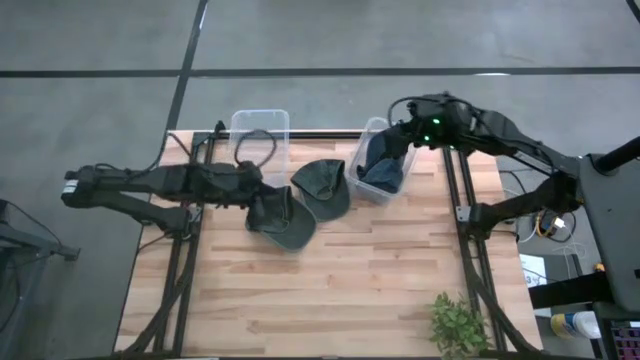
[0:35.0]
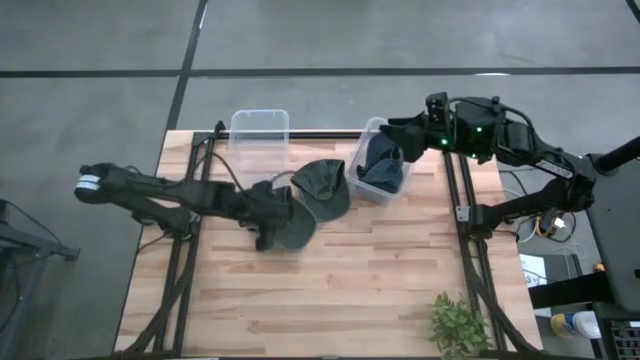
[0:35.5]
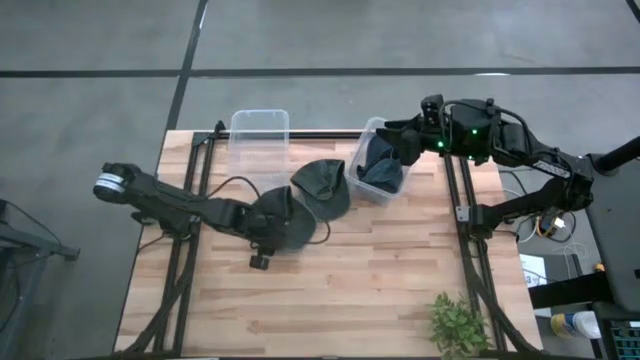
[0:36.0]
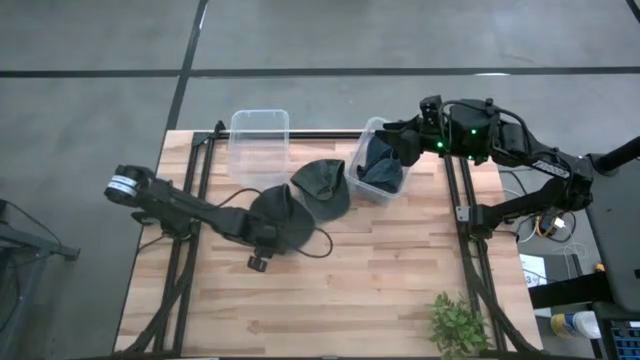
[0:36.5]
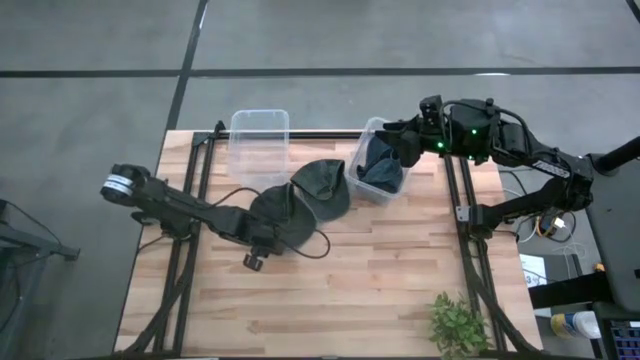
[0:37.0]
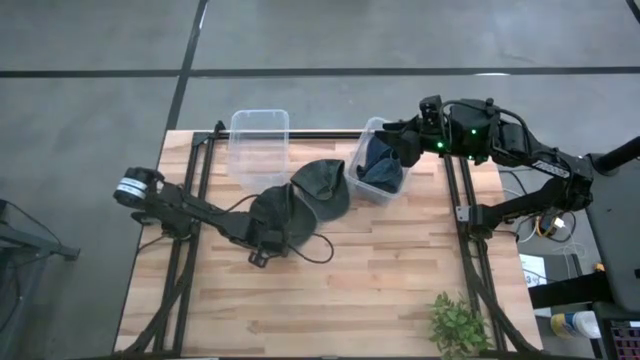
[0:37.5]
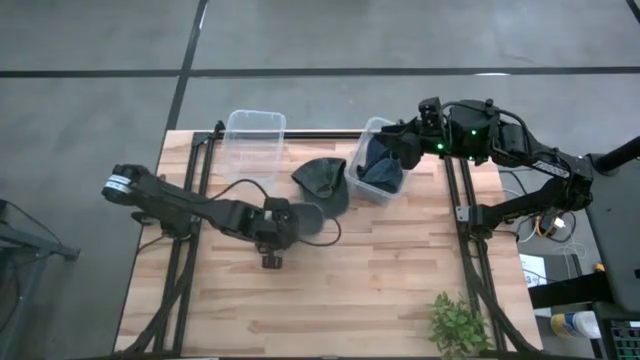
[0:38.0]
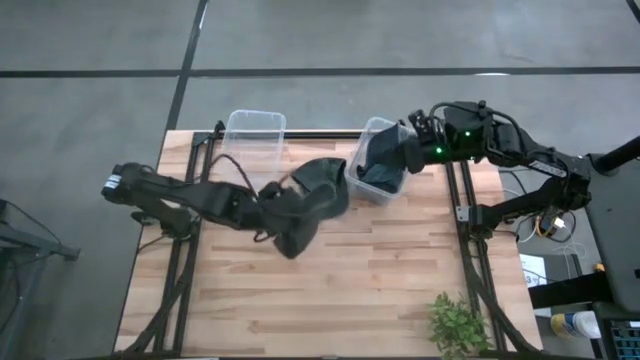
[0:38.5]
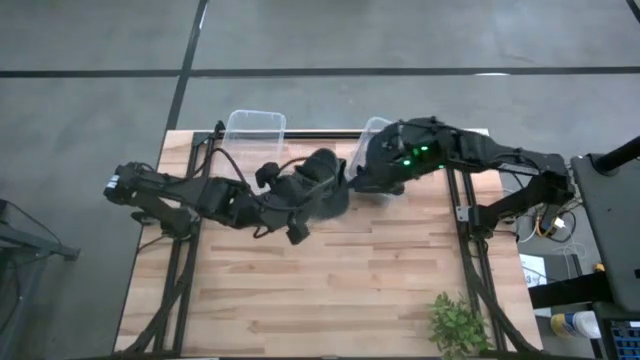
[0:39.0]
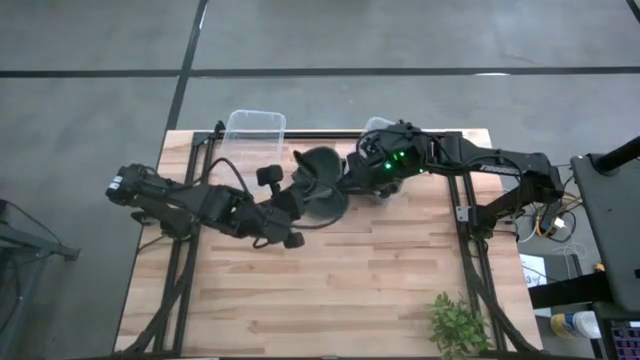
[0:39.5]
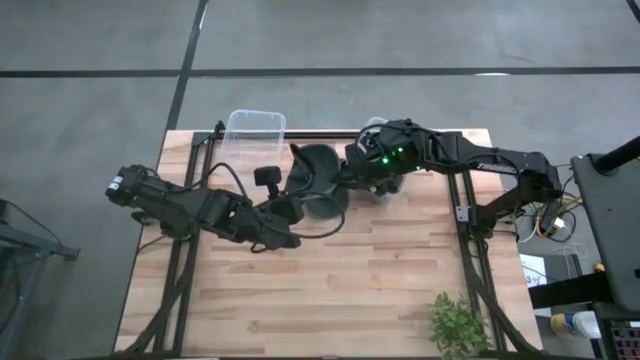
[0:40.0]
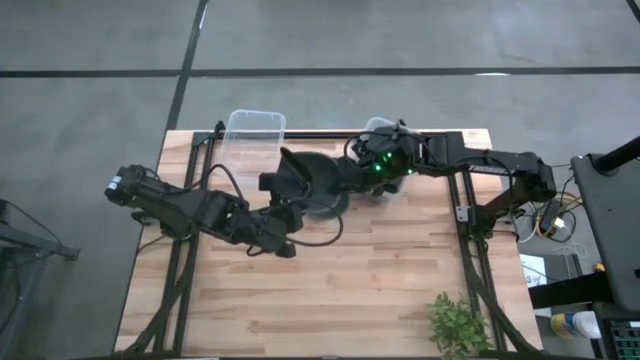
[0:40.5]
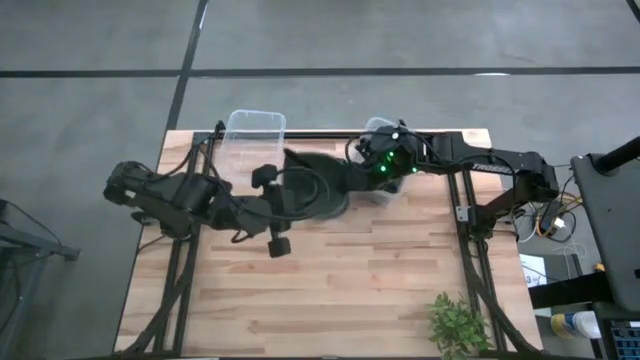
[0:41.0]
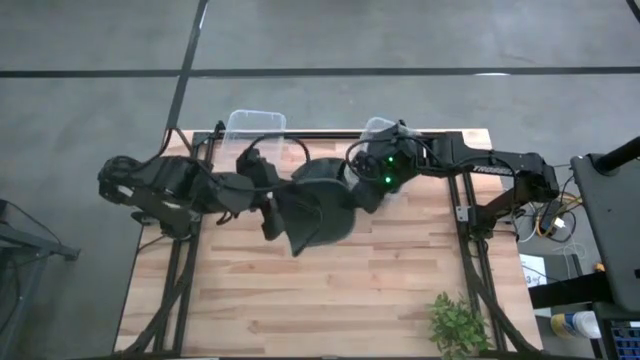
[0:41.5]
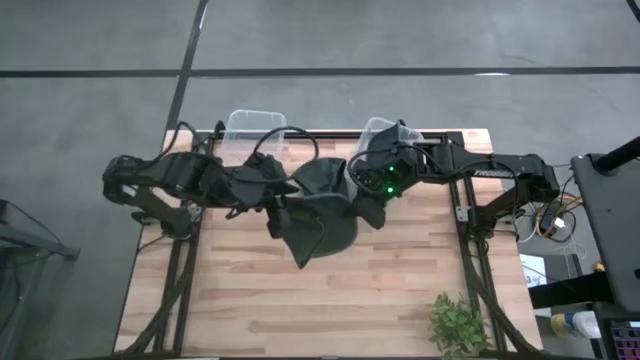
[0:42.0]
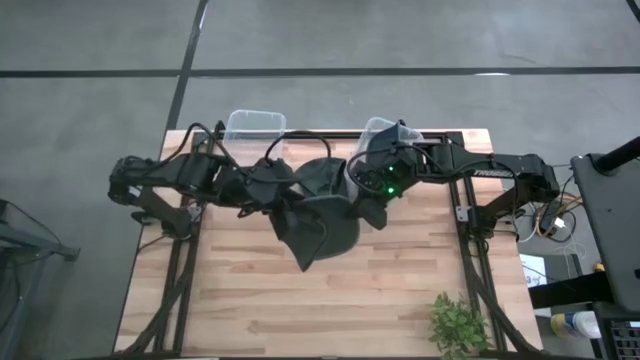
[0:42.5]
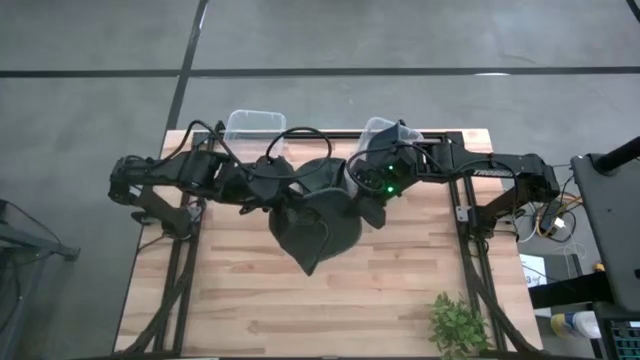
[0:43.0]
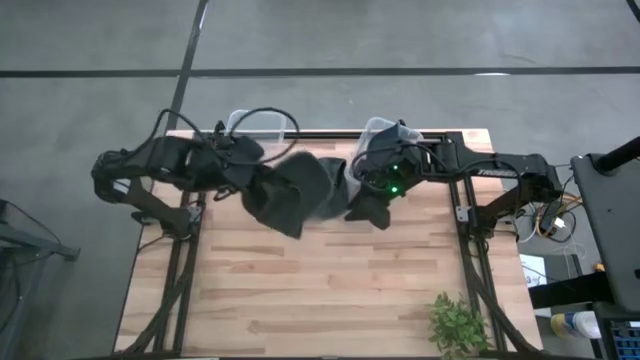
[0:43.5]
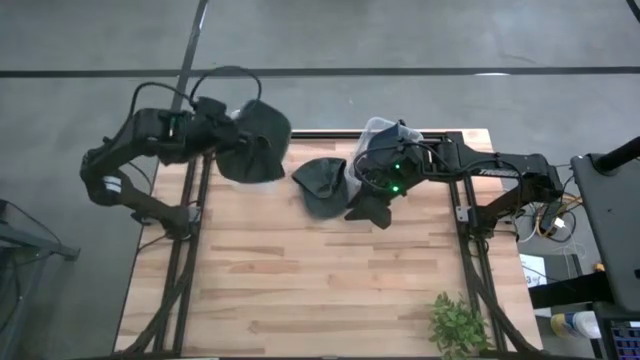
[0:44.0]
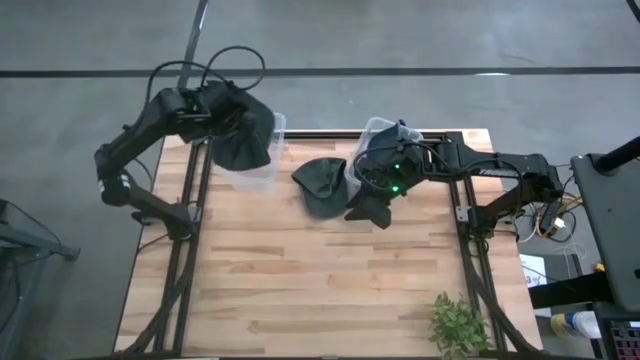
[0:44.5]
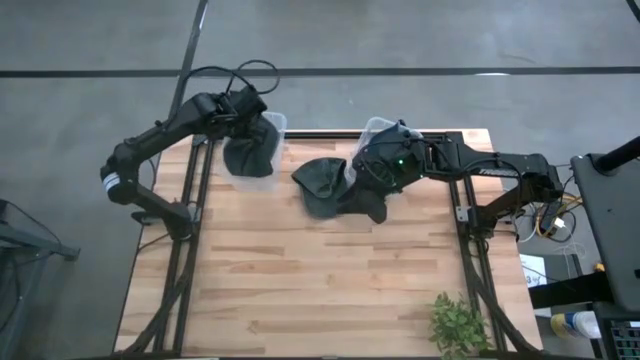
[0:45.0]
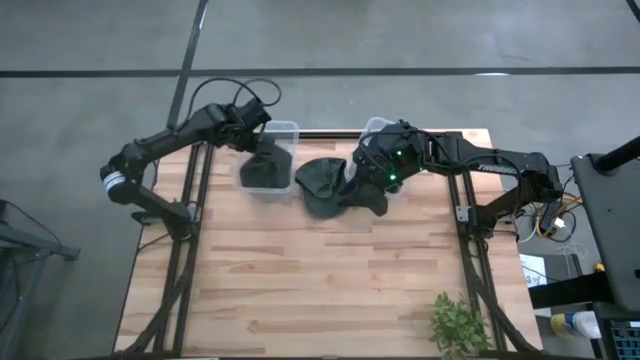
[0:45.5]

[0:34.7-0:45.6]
Task: Pick & Place hat
Put the bottom gray cap into the left transparent bin

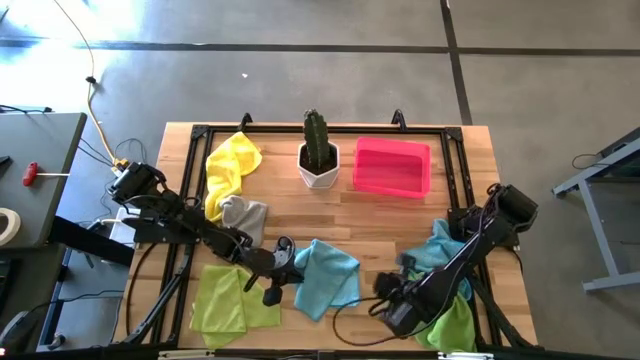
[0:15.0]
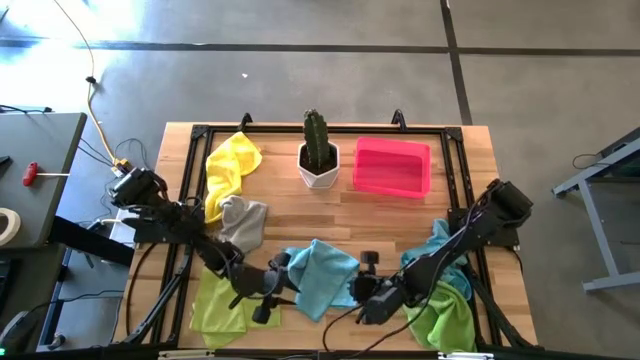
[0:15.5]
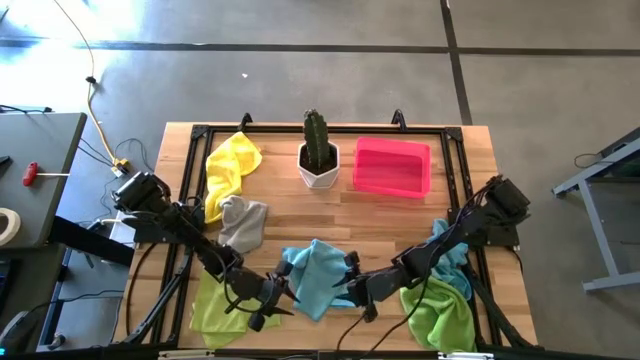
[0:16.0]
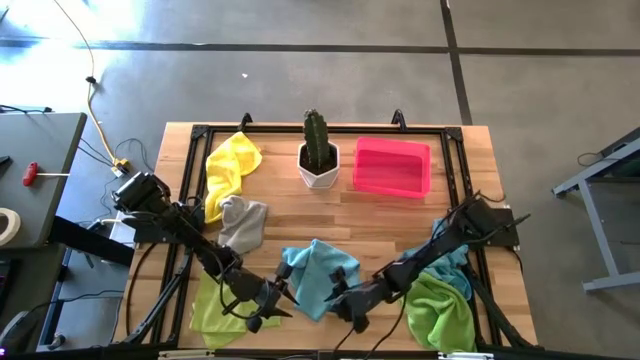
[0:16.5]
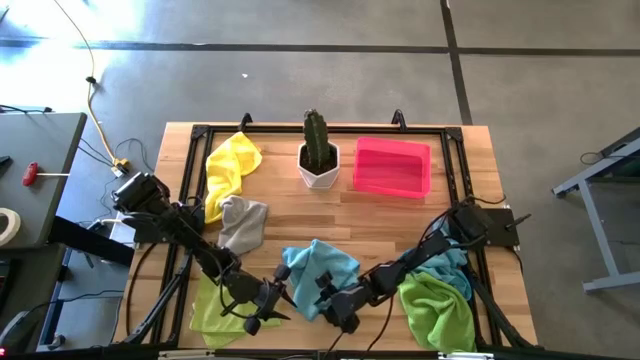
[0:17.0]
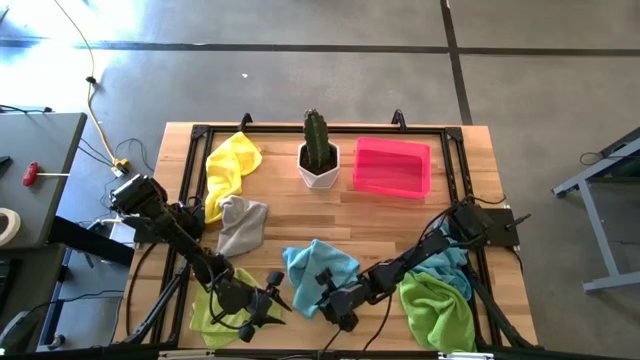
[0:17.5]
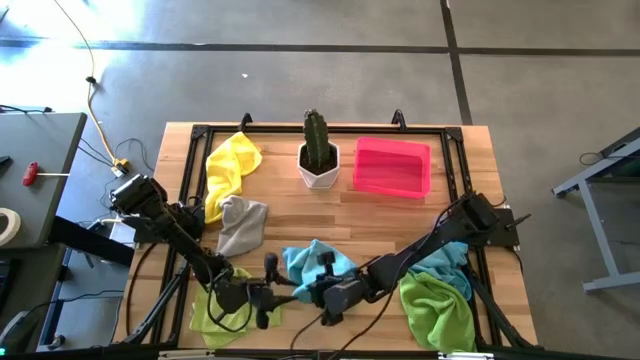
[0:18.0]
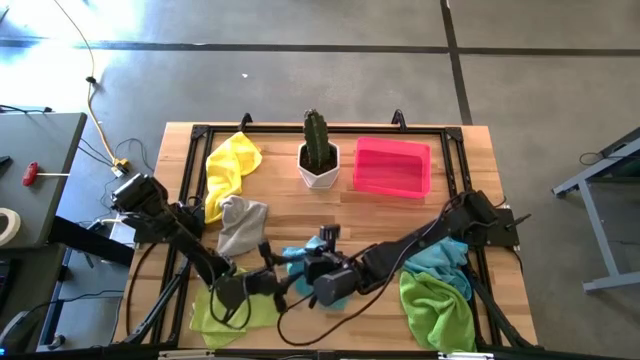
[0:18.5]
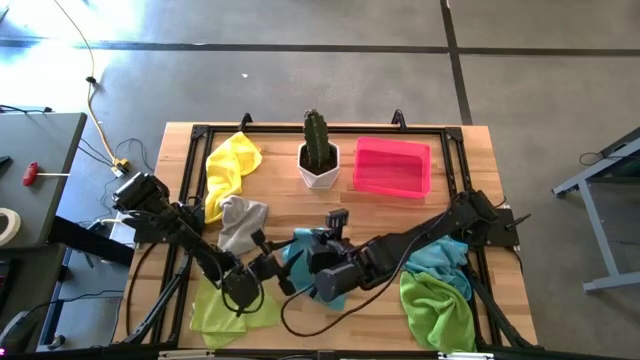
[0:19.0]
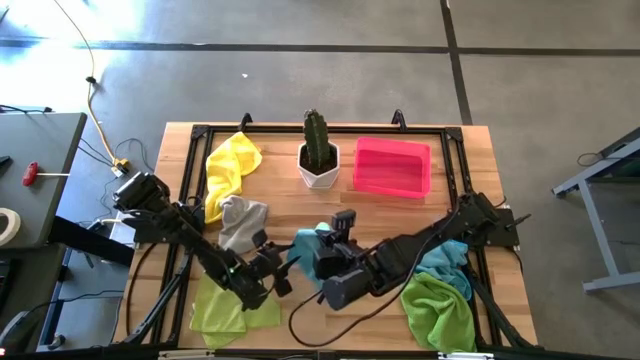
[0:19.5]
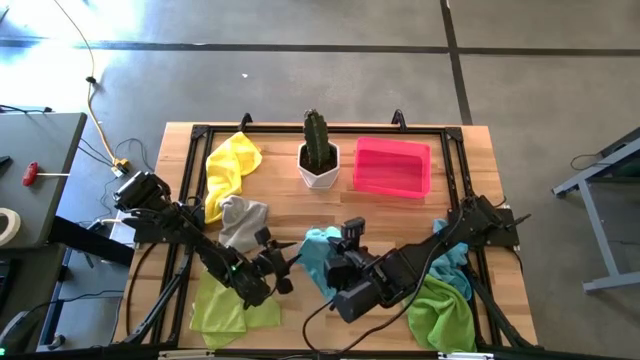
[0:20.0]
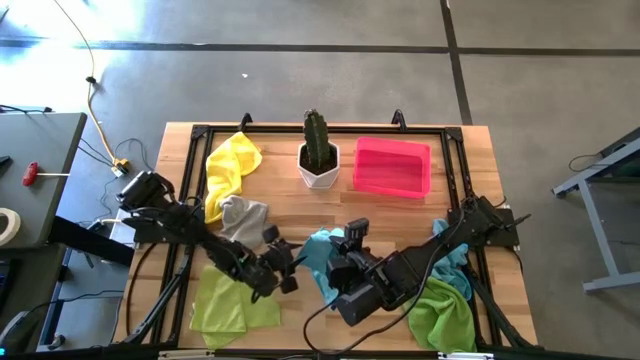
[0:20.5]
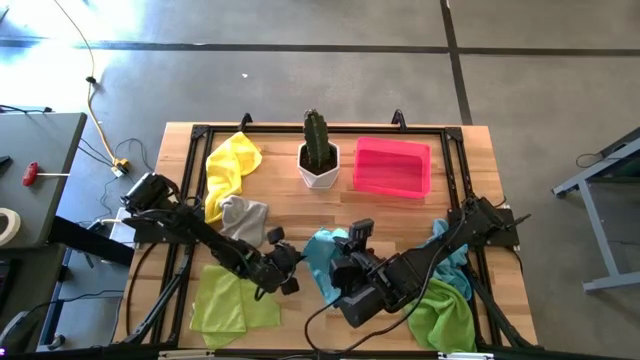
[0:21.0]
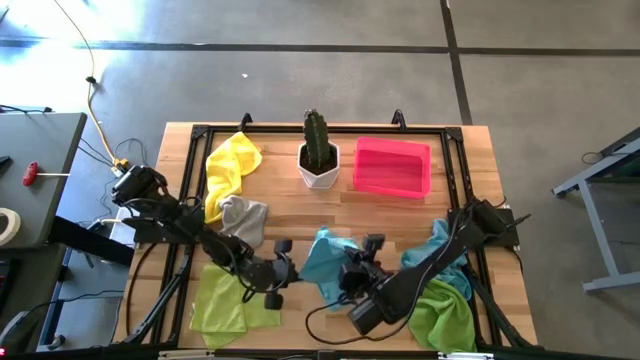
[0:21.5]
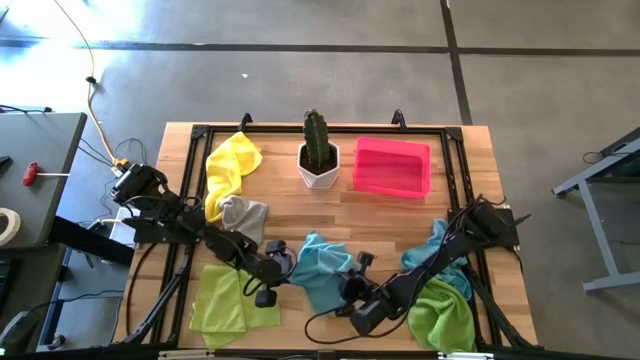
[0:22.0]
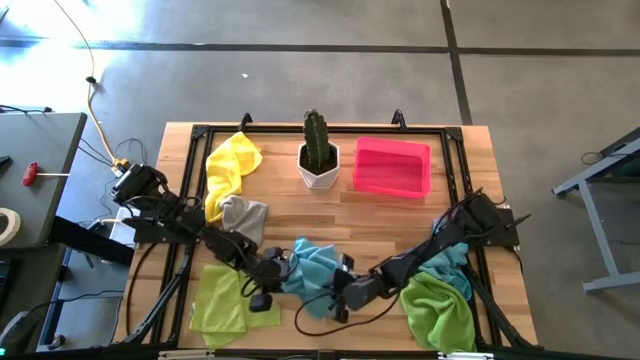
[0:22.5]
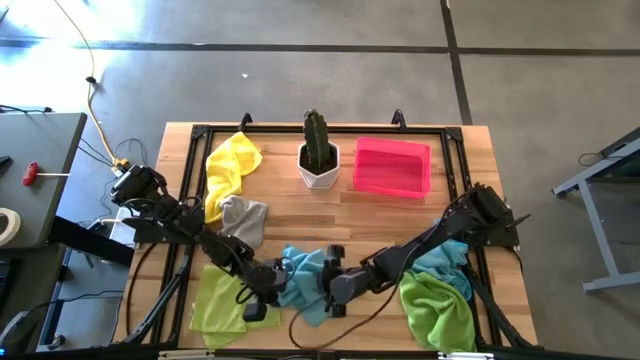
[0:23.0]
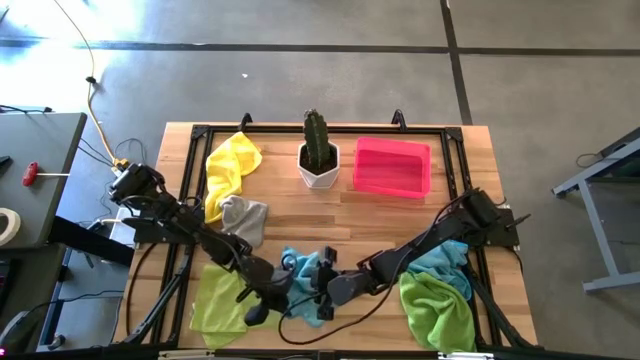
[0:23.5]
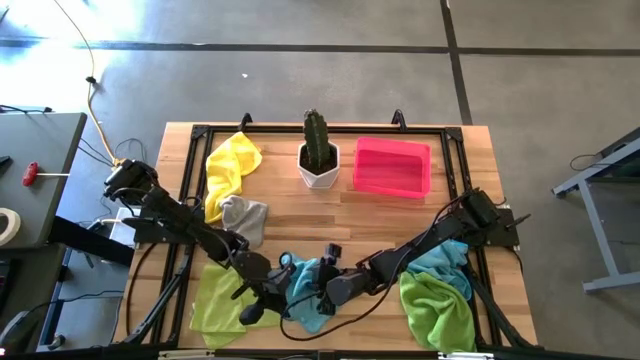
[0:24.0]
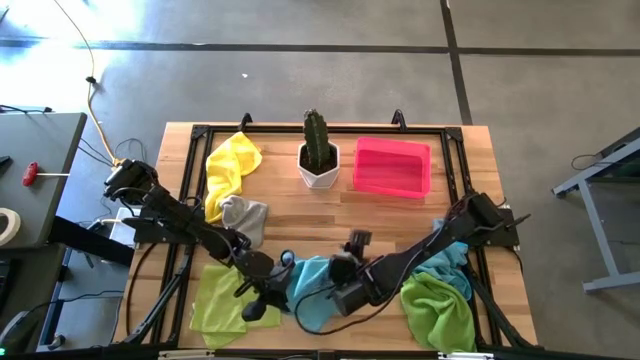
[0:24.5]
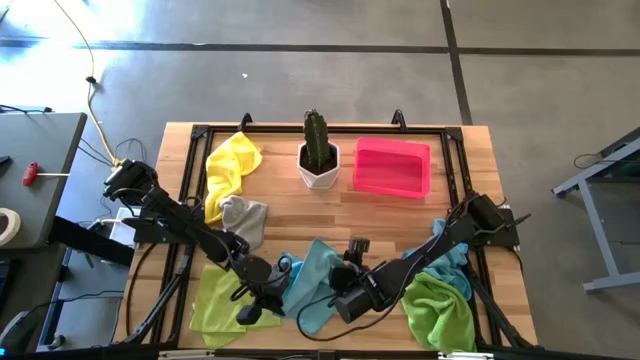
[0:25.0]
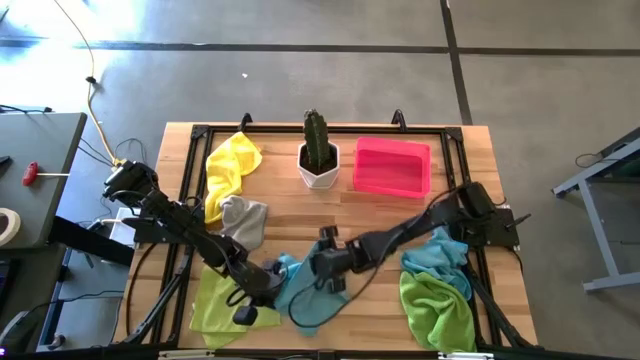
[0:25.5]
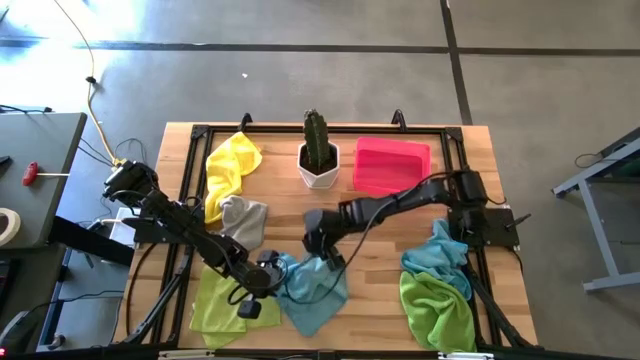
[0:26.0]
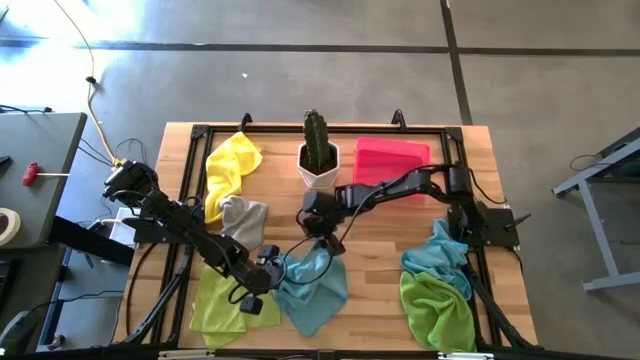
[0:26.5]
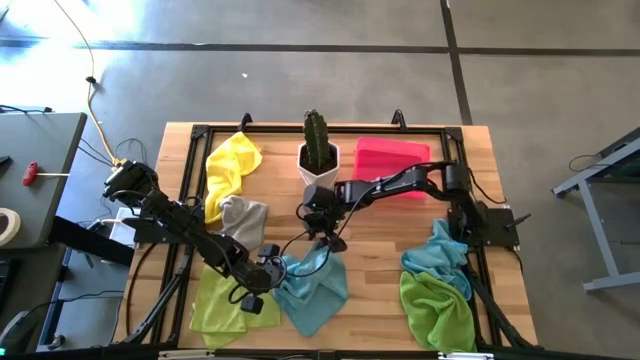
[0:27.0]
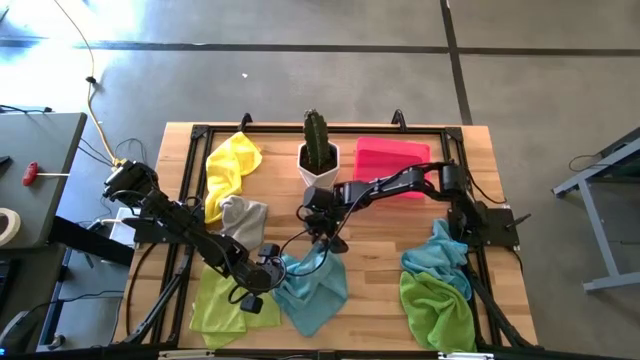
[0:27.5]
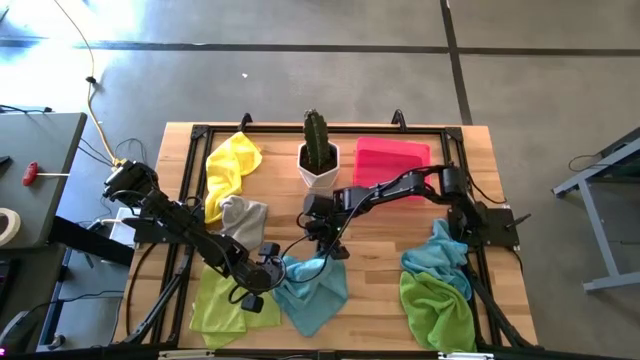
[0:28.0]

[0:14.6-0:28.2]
Task: Fold microfiber towels
Fold the blue towel
